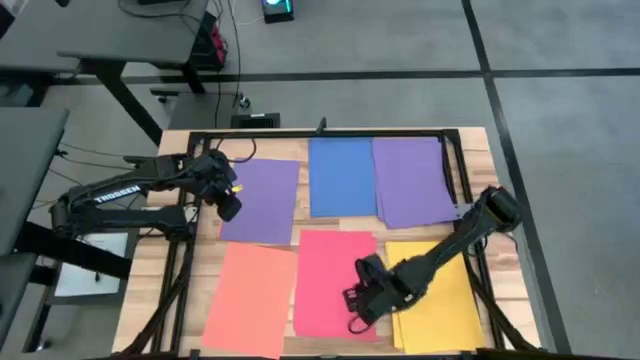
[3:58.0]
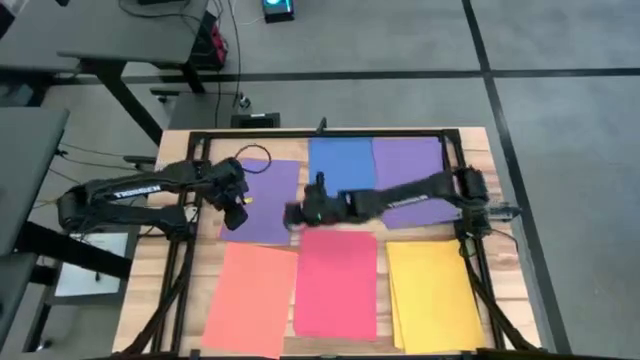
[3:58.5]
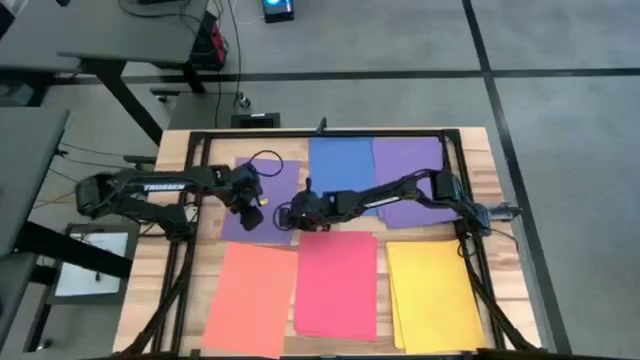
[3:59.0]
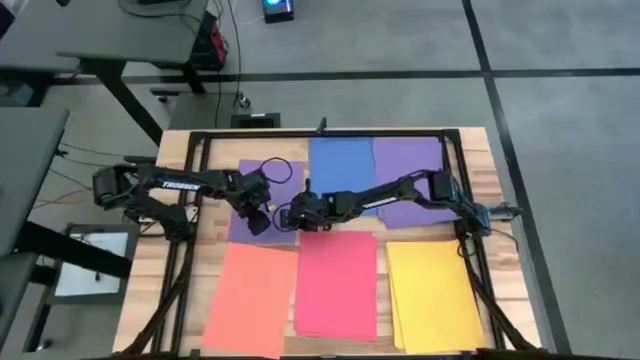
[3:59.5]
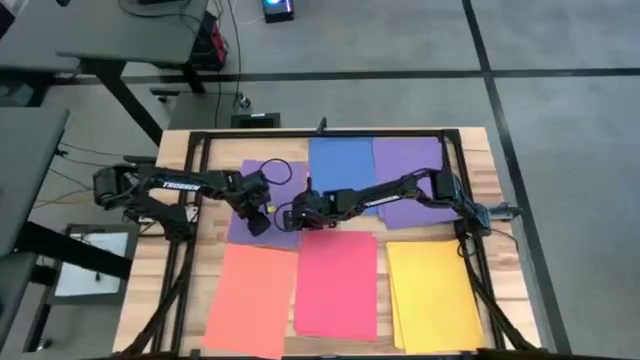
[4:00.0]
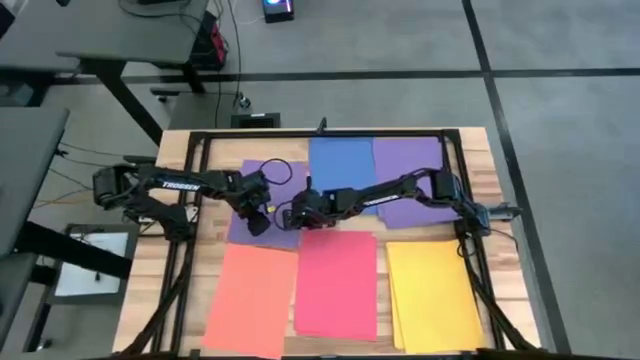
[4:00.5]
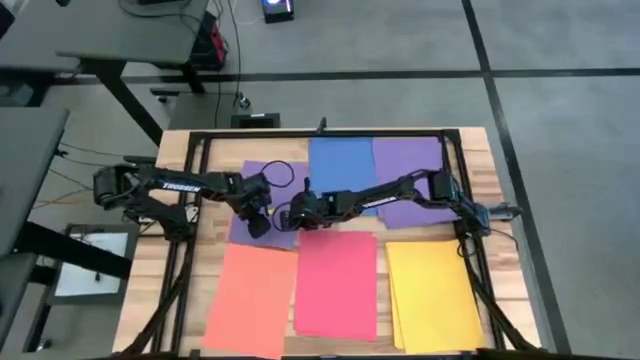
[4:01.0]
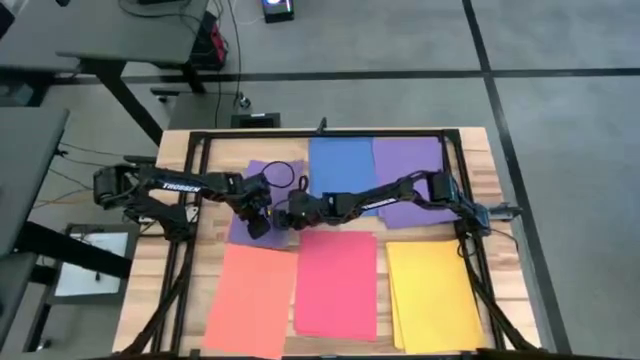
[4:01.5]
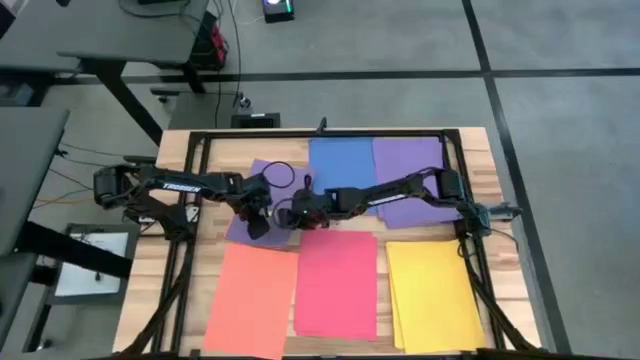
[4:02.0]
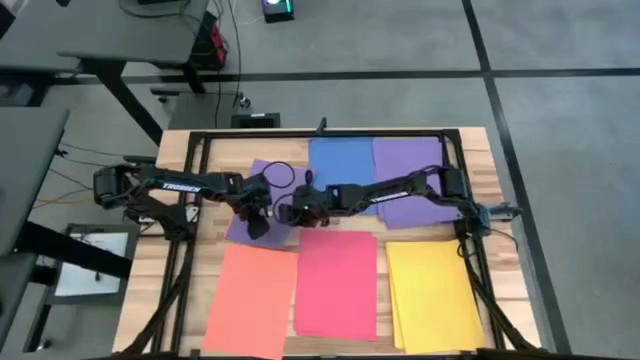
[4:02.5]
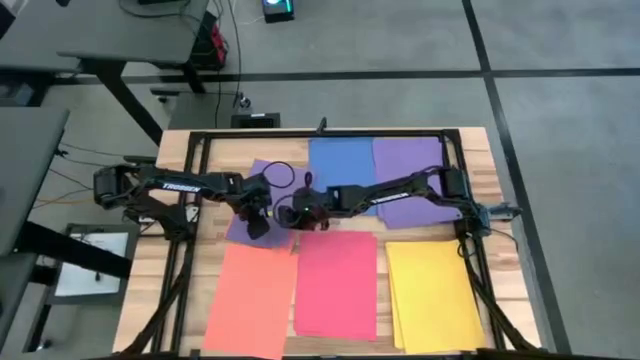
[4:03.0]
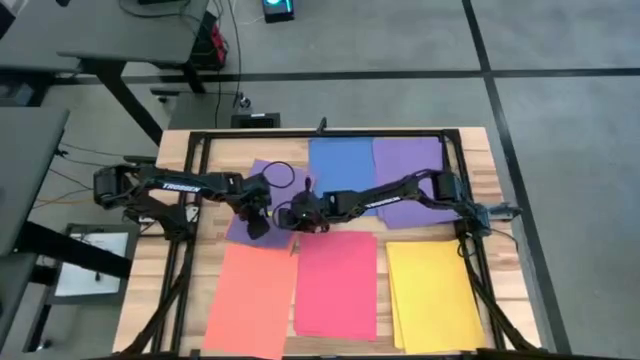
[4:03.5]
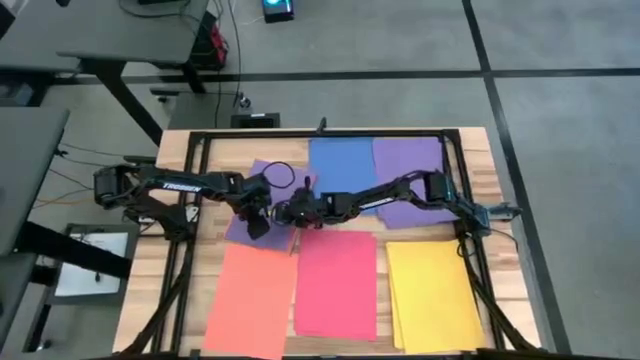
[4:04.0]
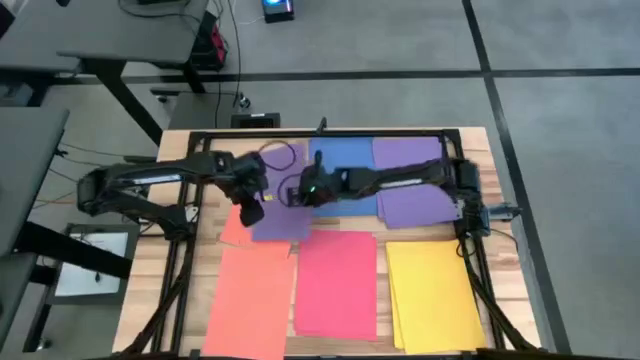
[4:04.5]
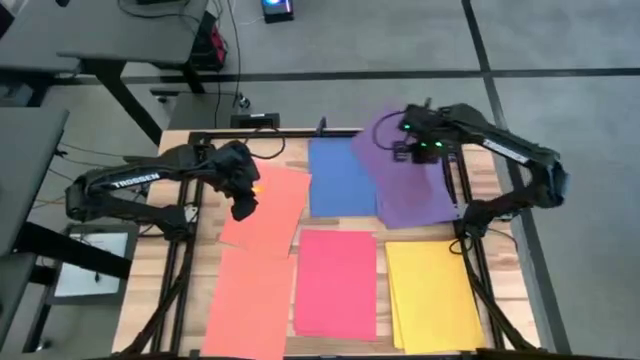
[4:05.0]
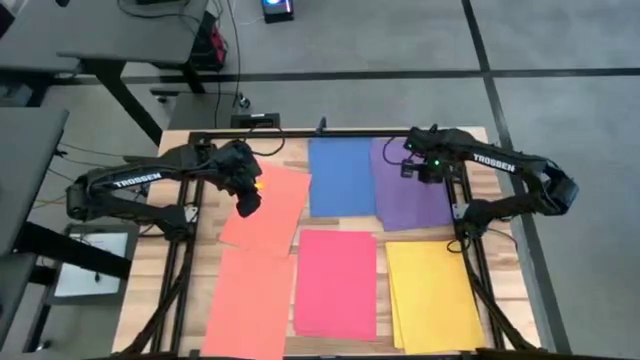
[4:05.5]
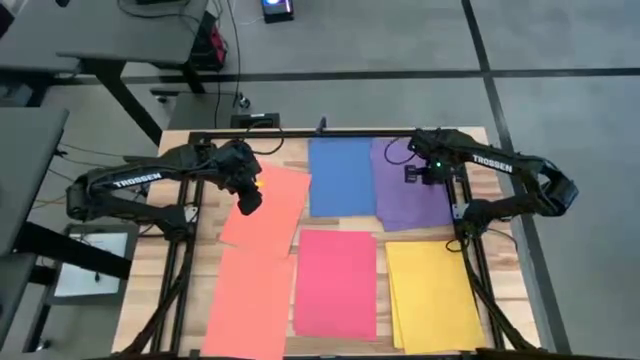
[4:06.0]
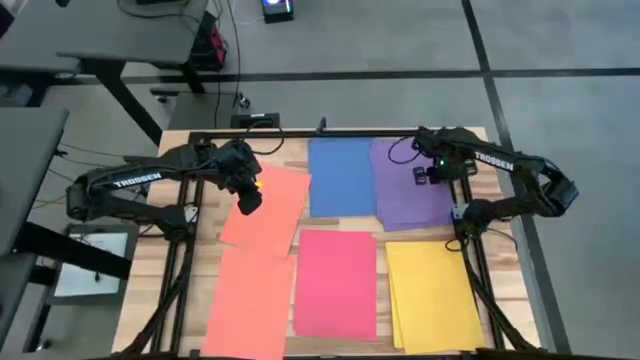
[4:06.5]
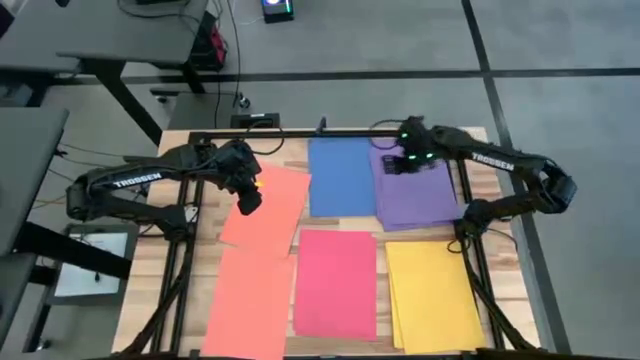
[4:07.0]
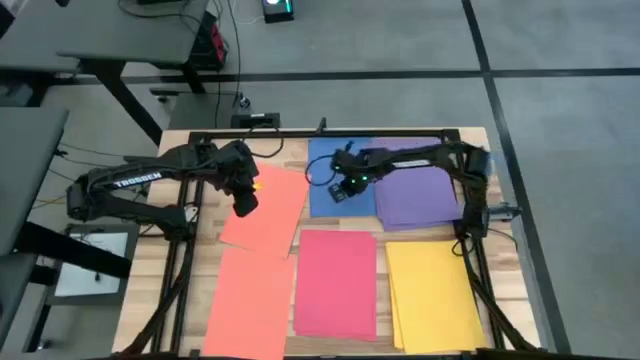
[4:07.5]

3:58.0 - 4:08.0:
Task: Organize paper
Stack the purple paper on the top right purple papers

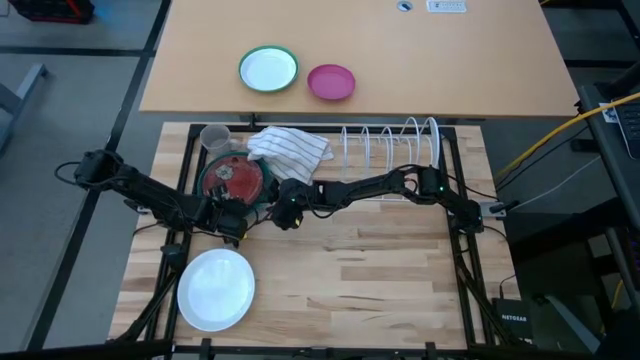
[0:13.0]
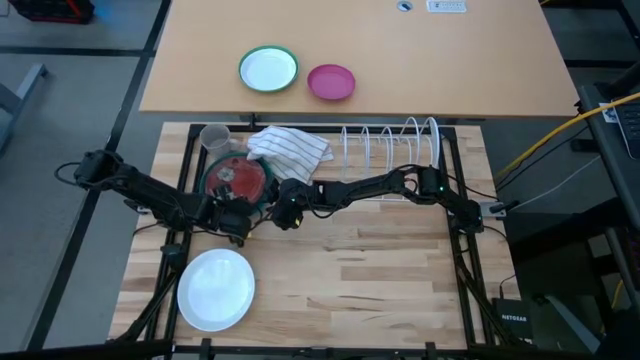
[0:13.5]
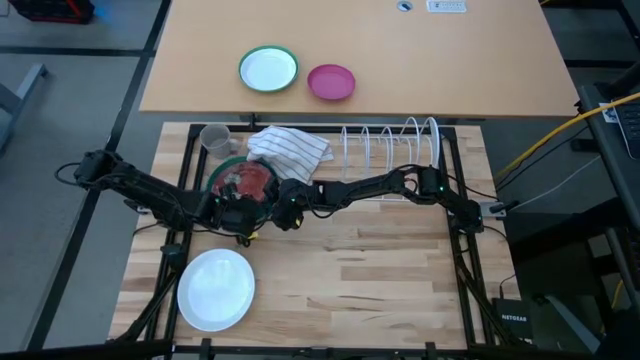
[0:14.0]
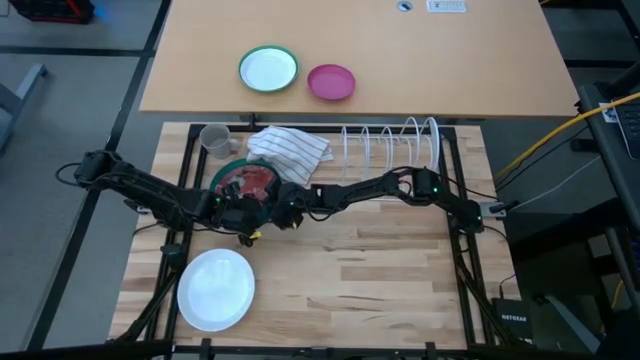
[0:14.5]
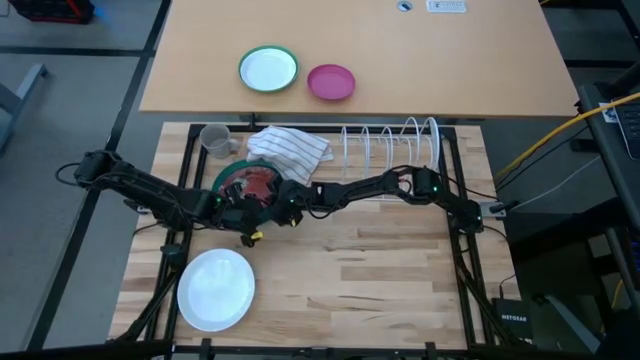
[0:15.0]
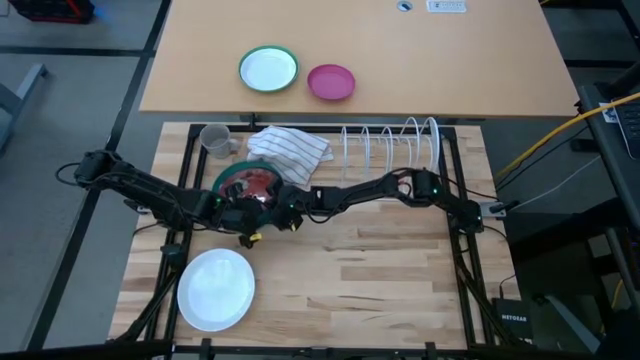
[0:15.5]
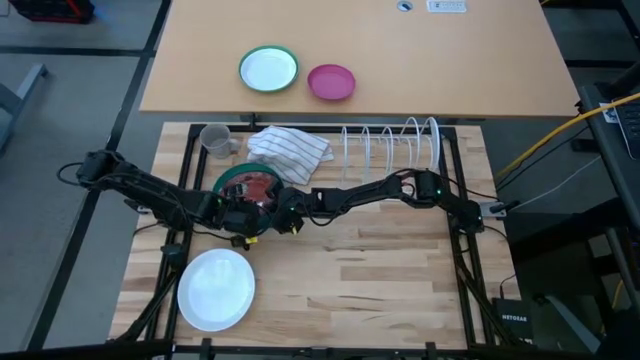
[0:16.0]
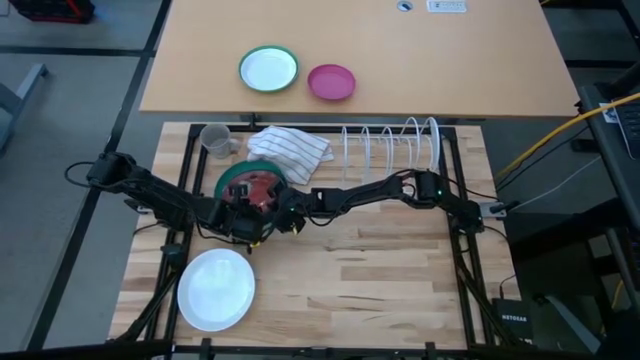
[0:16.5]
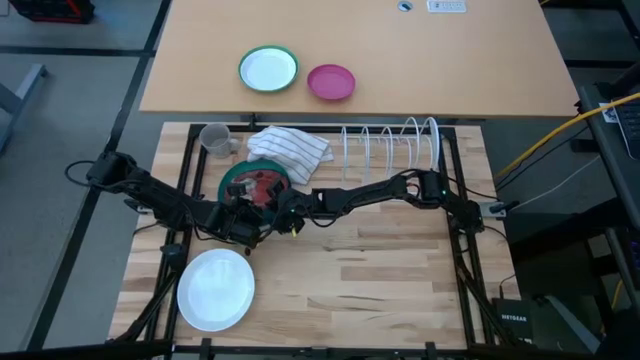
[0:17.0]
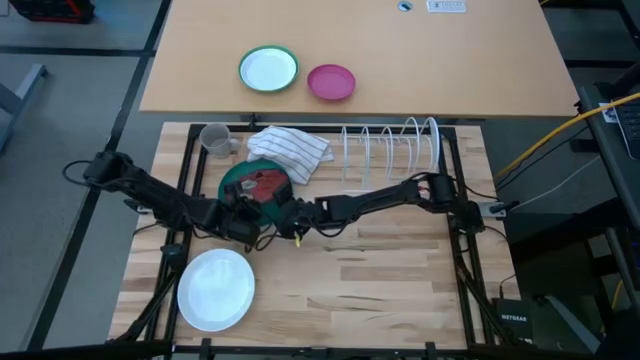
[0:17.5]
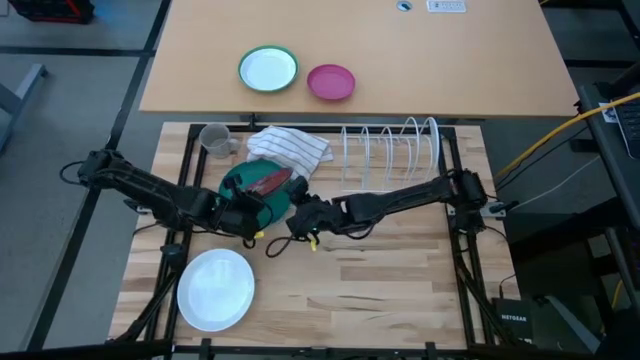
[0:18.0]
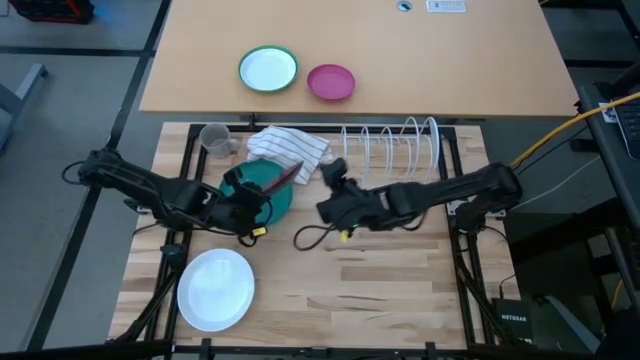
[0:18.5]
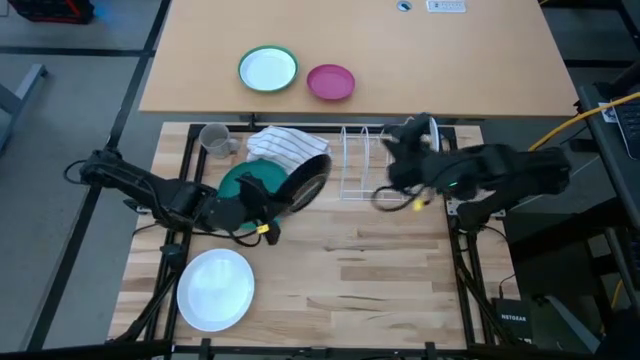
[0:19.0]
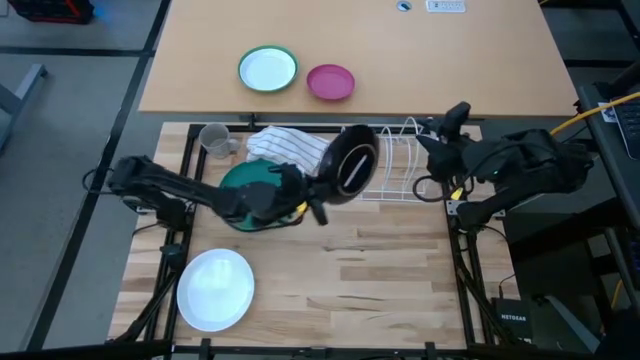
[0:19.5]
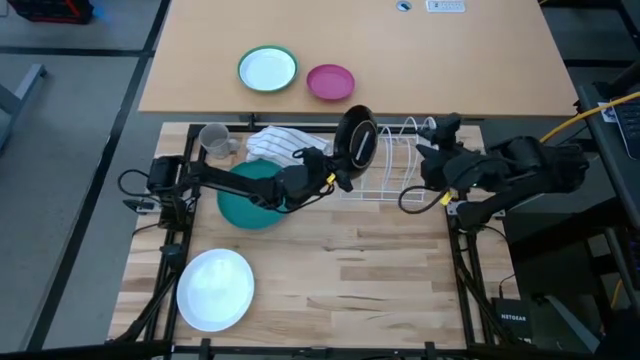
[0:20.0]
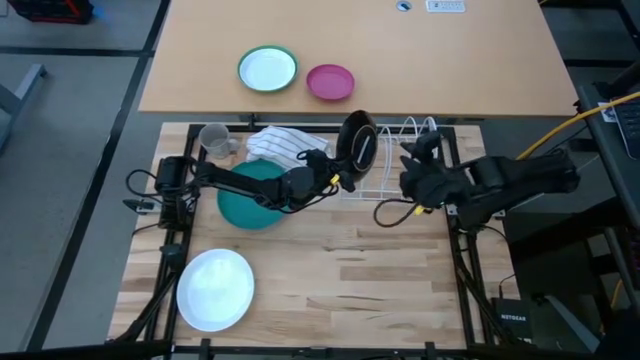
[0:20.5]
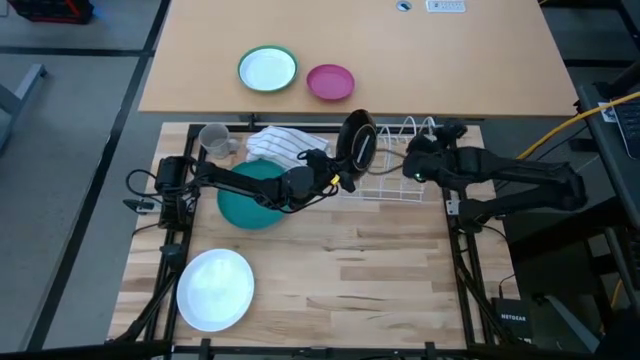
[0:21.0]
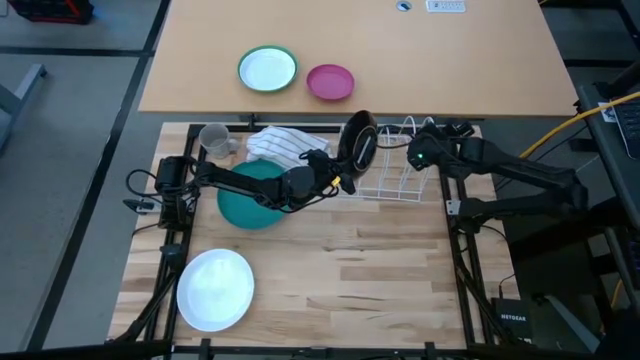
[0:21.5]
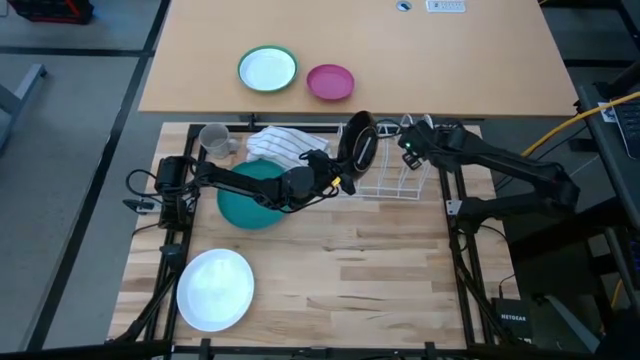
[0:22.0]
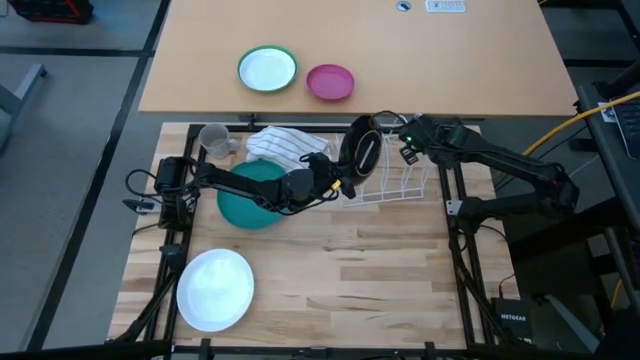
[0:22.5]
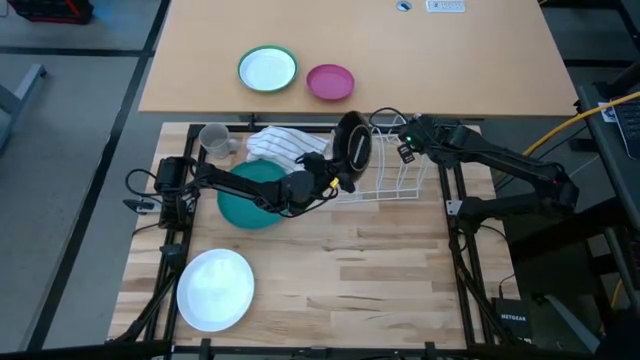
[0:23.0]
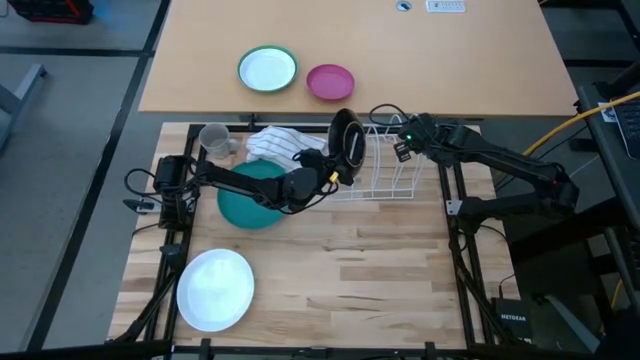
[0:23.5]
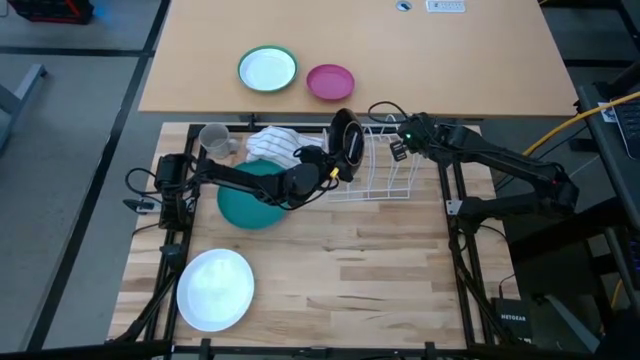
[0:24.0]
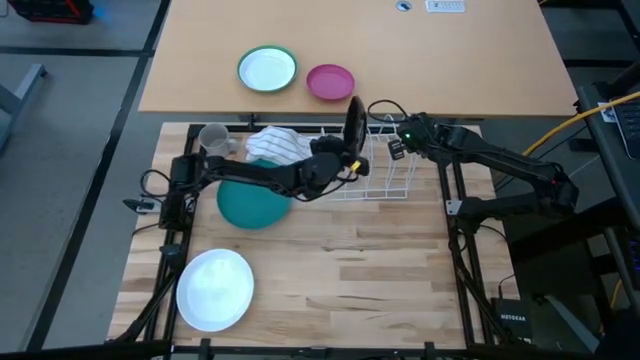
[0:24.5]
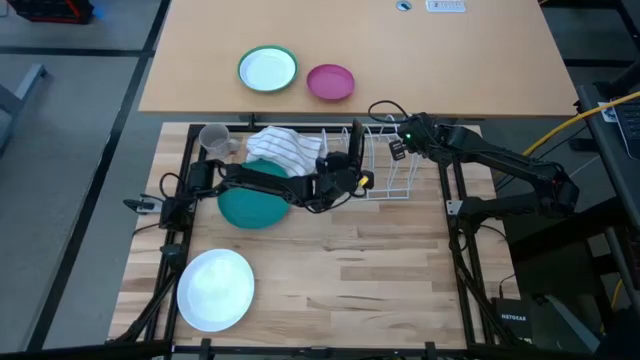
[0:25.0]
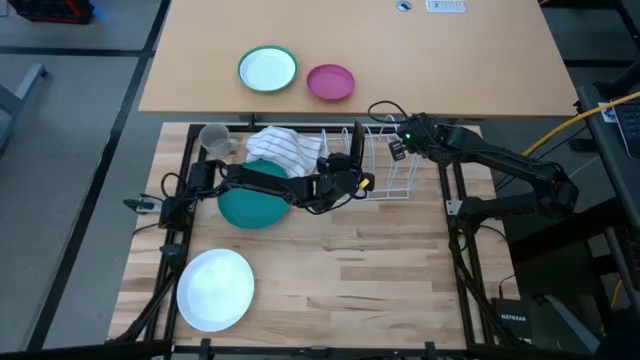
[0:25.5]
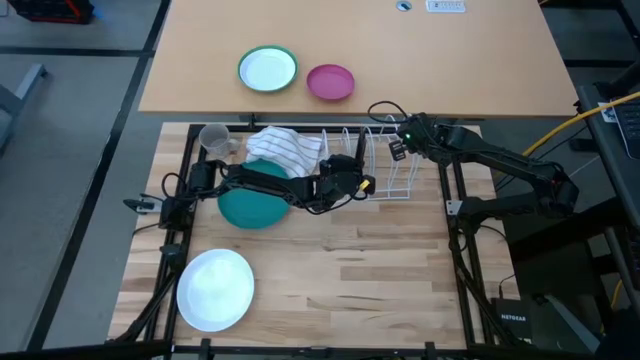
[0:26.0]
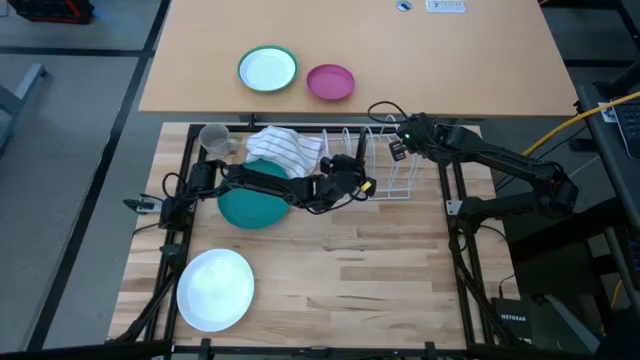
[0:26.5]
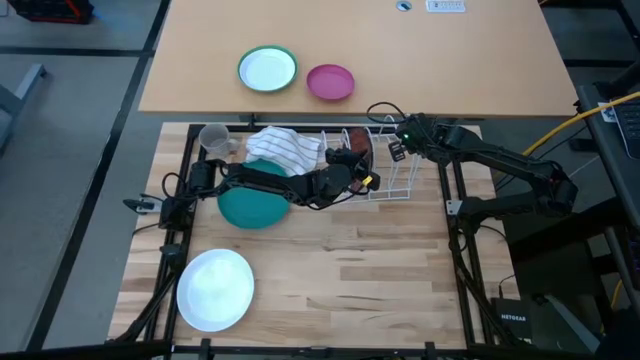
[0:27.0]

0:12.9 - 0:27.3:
Task: Sort dishes
Put the red plate in the dish rack
